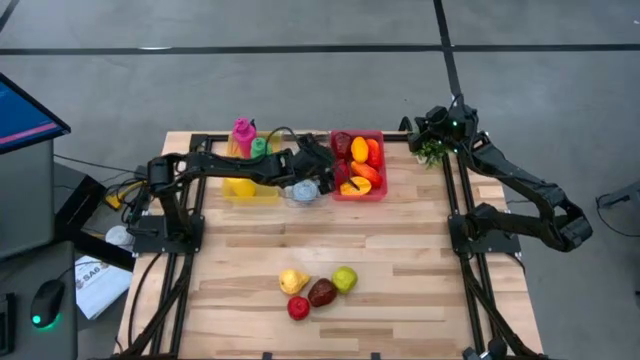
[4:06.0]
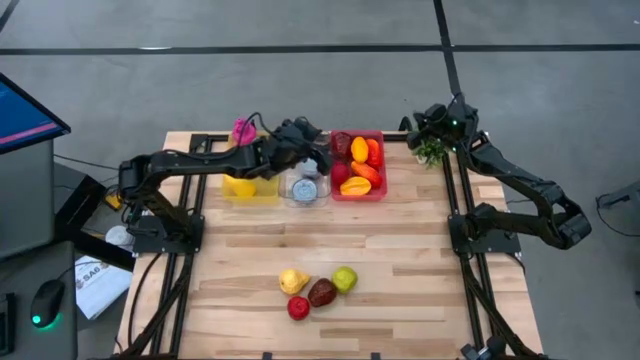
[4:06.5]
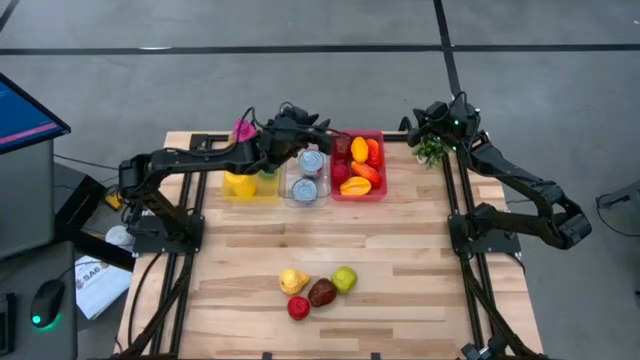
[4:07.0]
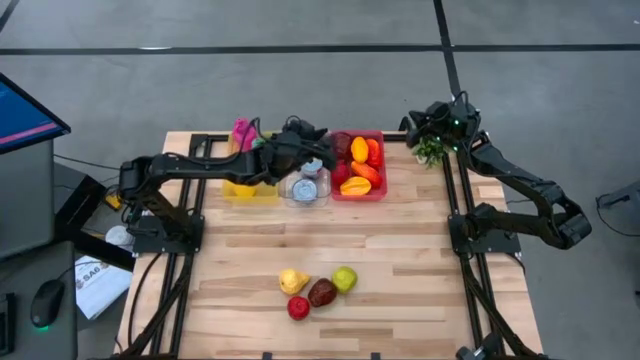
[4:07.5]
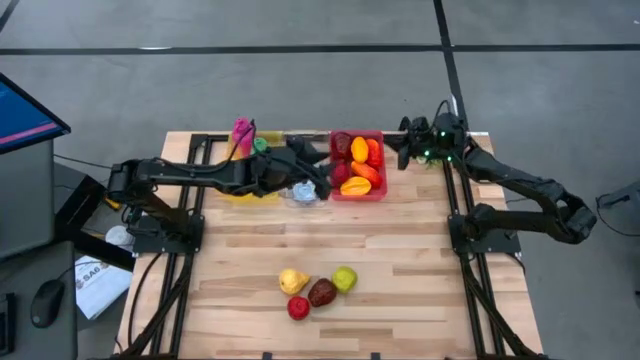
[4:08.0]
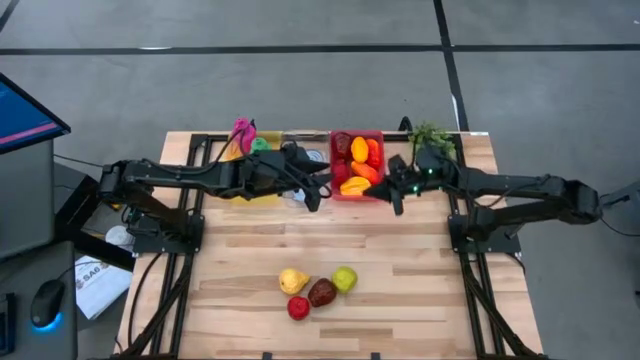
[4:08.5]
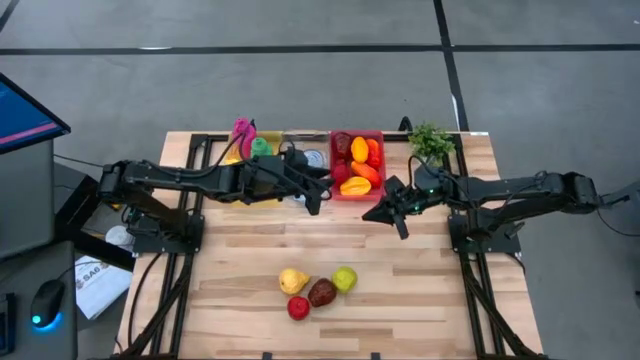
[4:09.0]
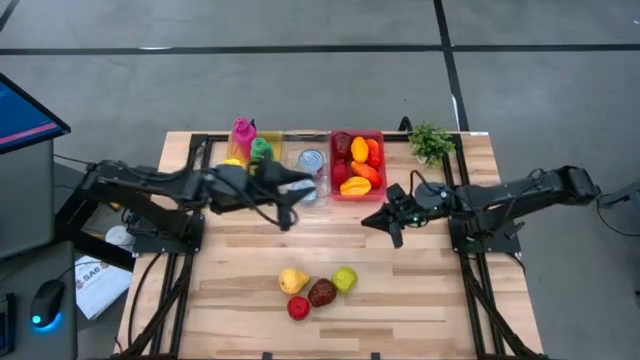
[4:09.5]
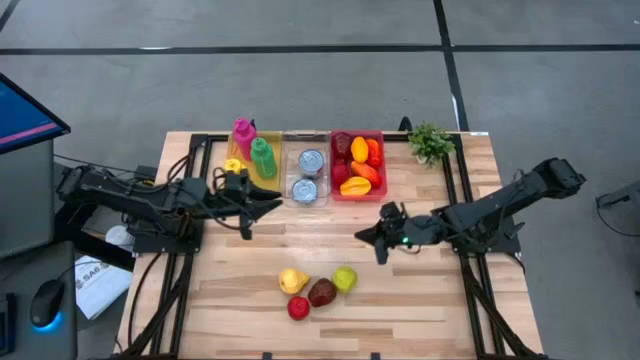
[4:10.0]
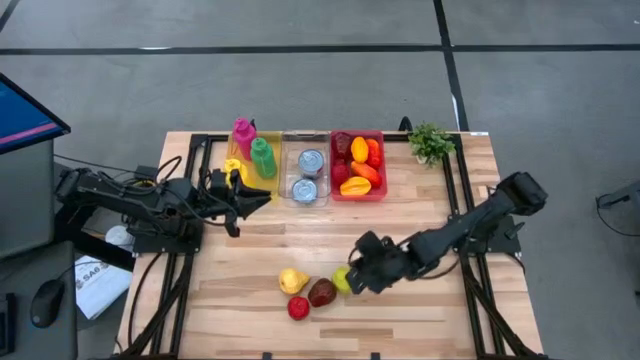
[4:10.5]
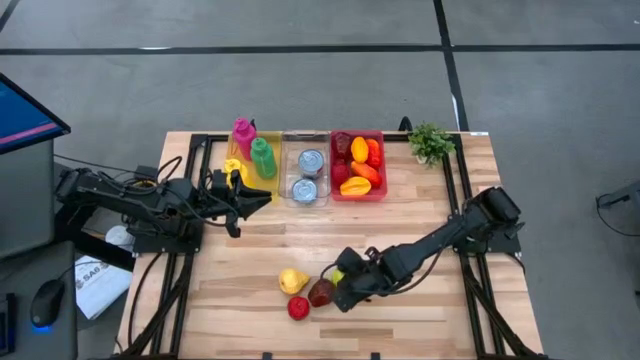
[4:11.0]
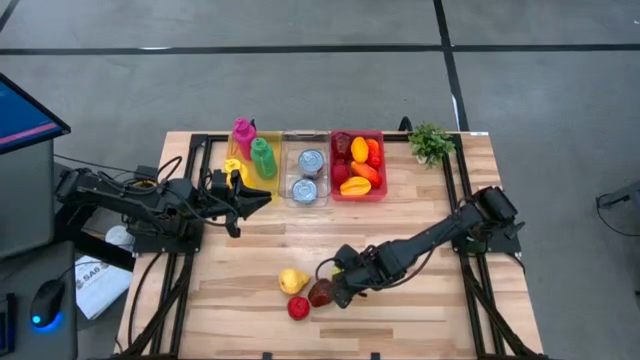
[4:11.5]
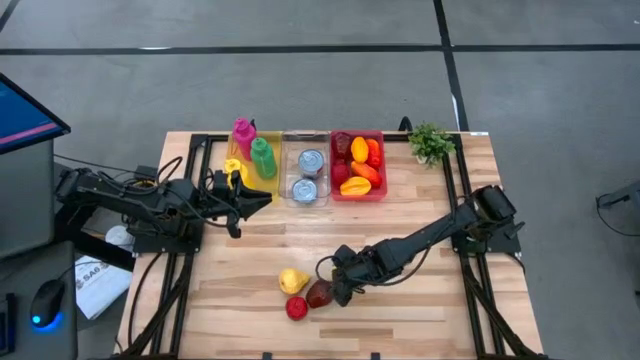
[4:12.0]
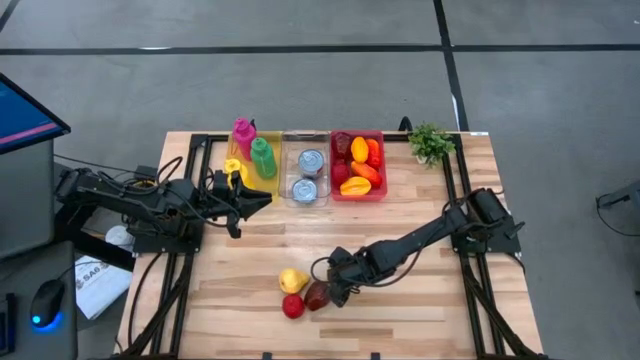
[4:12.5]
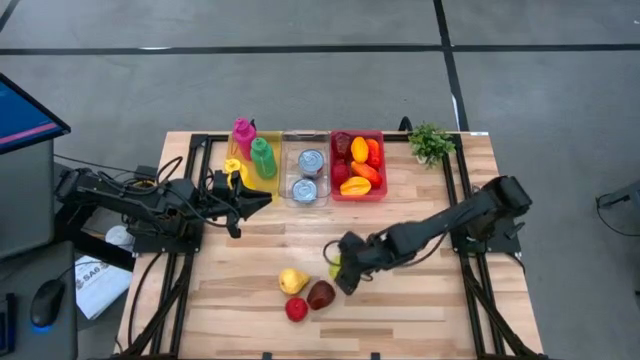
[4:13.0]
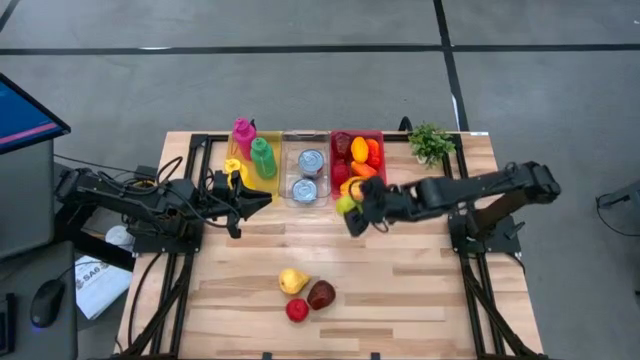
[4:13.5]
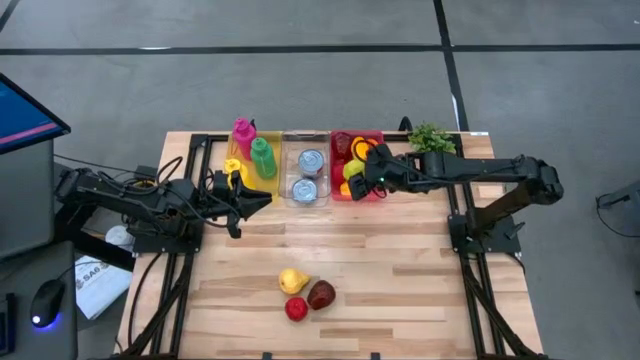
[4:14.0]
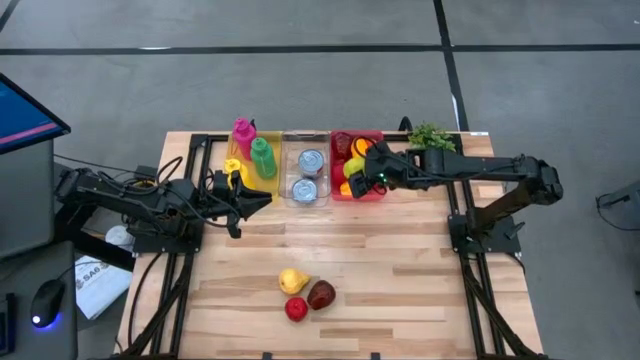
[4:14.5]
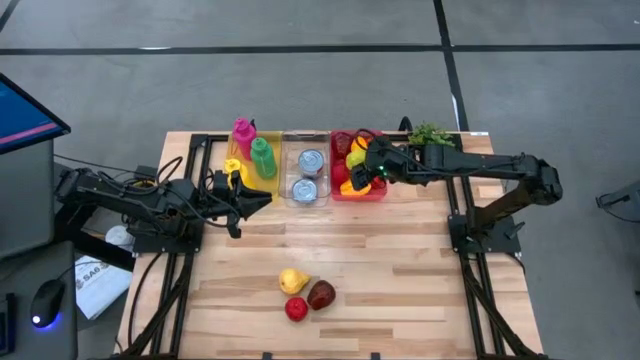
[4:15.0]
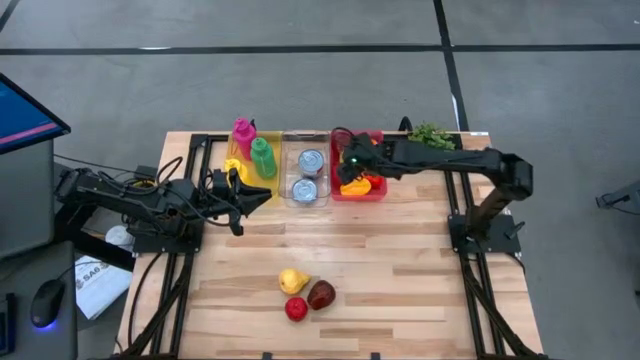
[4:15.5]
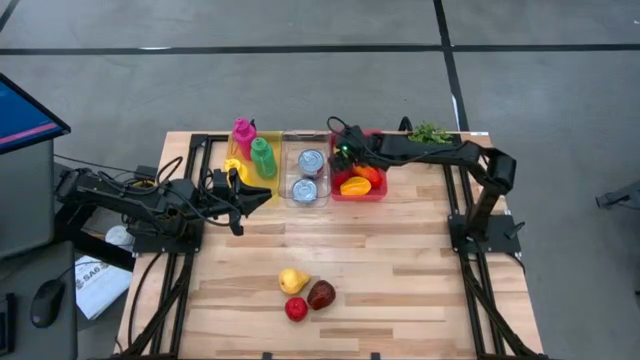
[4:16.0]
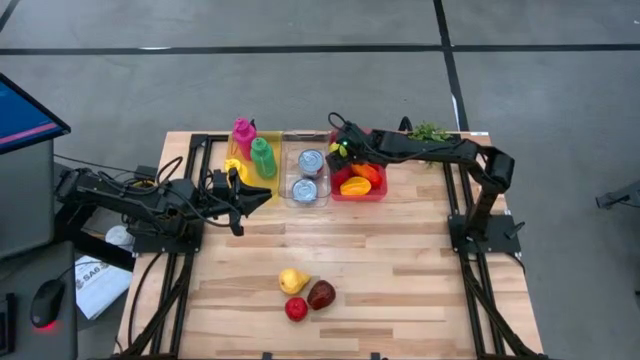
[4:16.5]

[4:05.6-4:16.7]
Task: Pick & Place Food Item
Put the green apple into the pink bin

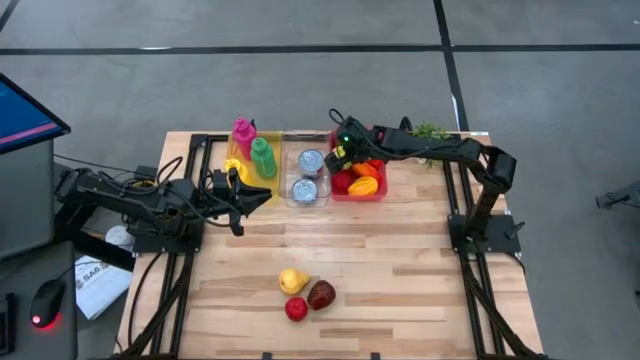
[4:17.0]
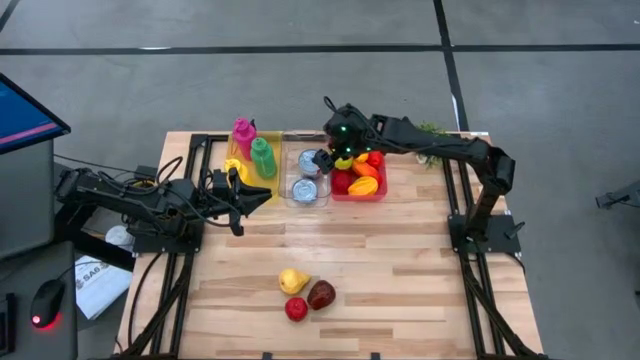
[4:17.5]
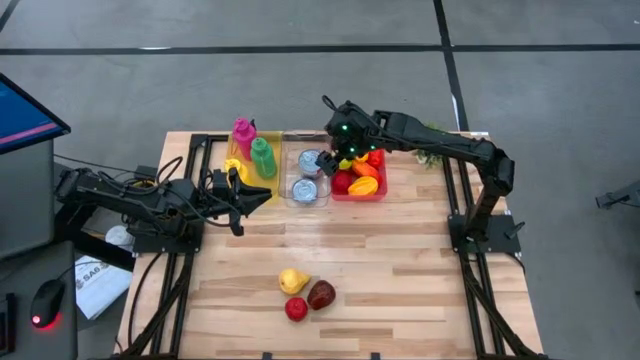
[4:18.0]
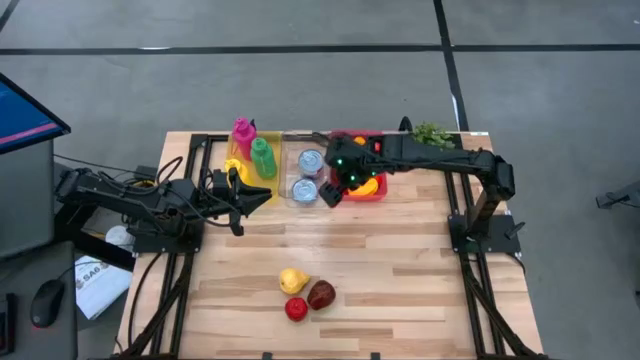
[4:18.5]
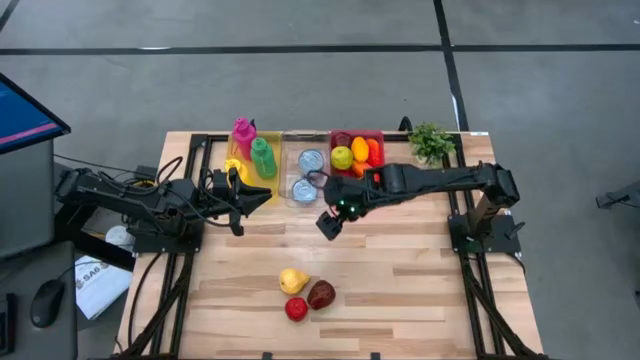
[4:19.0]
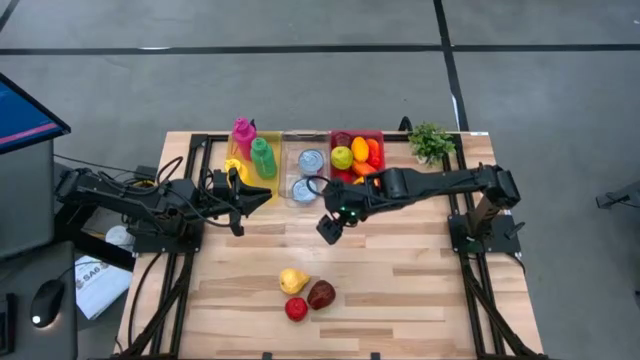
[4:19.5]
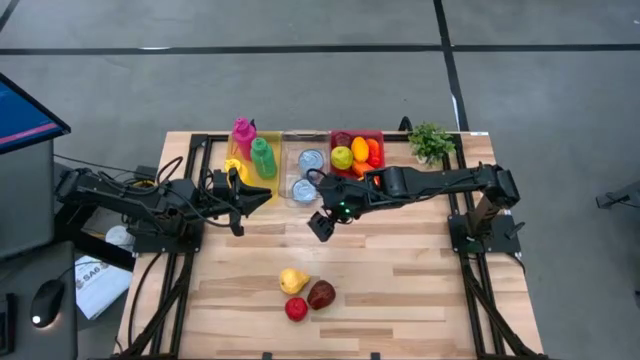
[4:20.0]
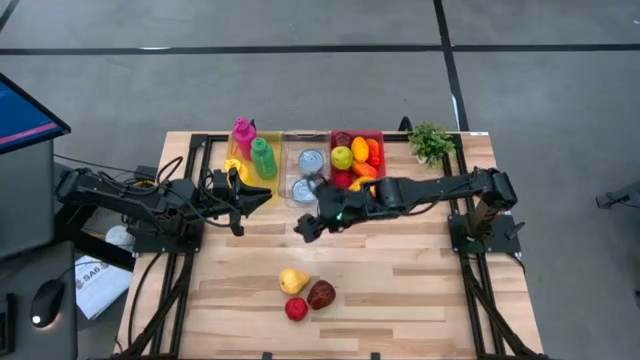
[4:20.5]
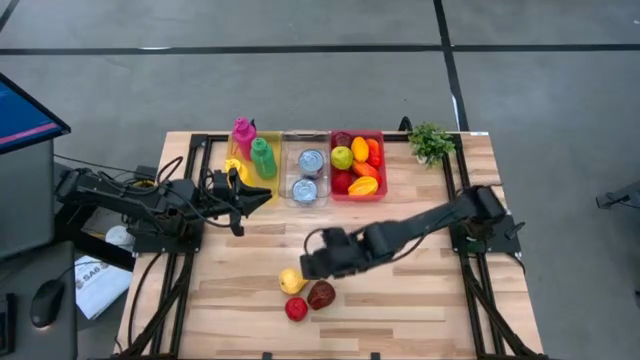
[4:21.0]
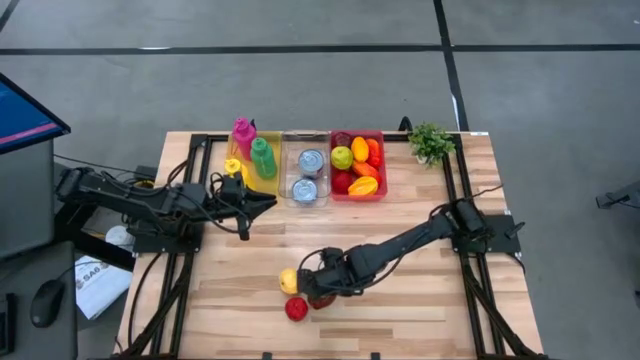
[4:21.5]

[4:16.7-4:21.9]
Put the right red apple into the pink bin

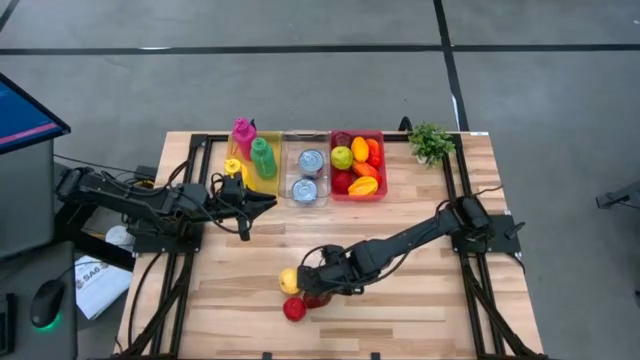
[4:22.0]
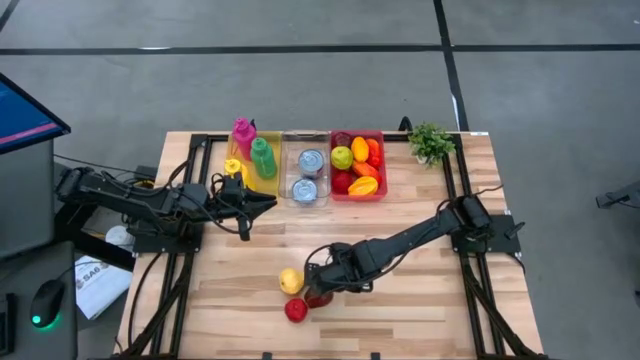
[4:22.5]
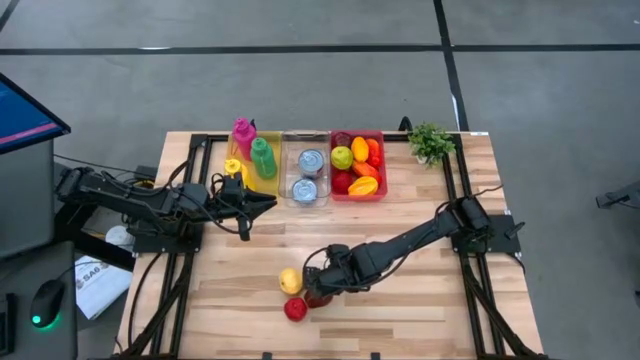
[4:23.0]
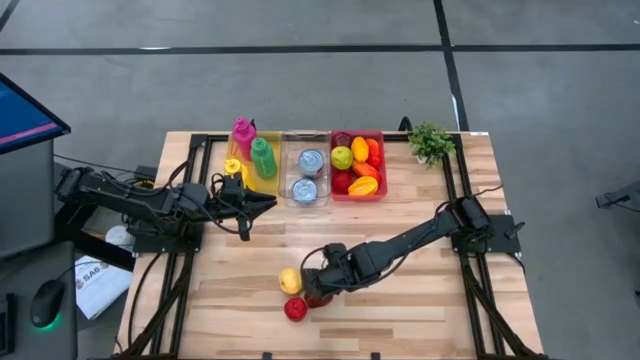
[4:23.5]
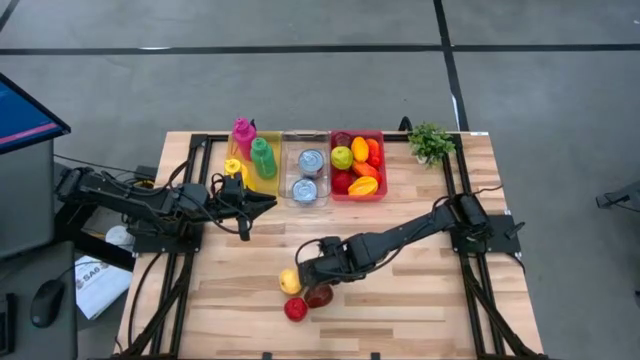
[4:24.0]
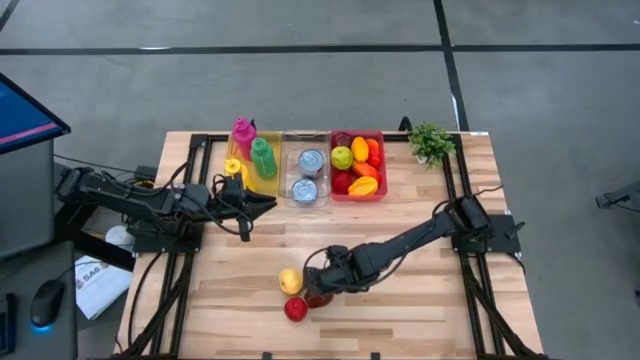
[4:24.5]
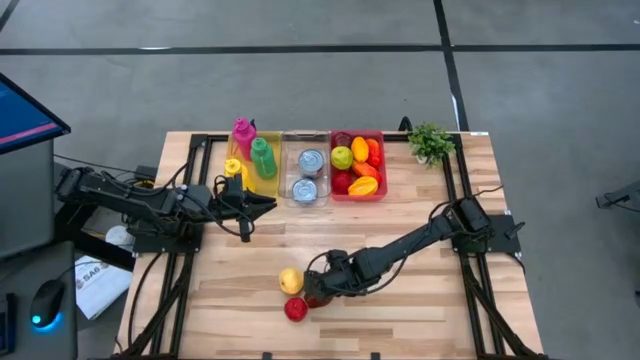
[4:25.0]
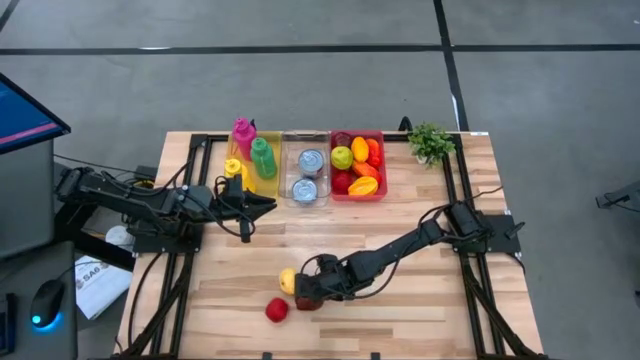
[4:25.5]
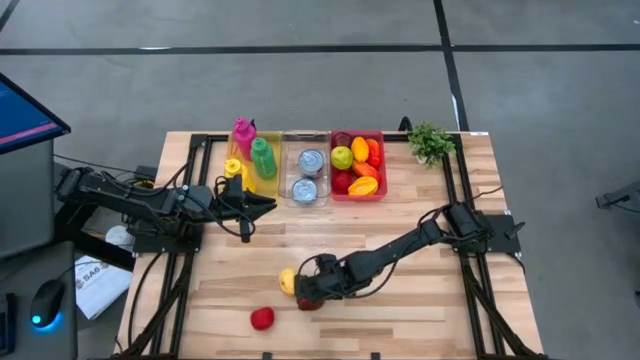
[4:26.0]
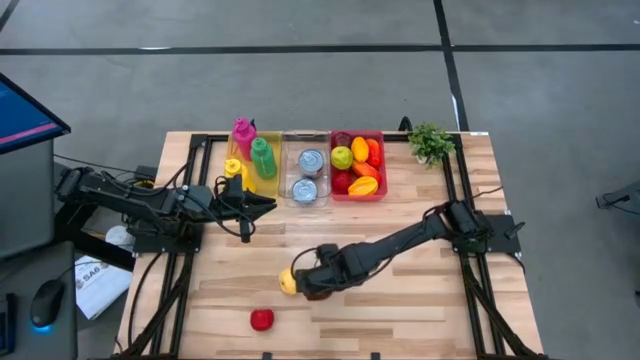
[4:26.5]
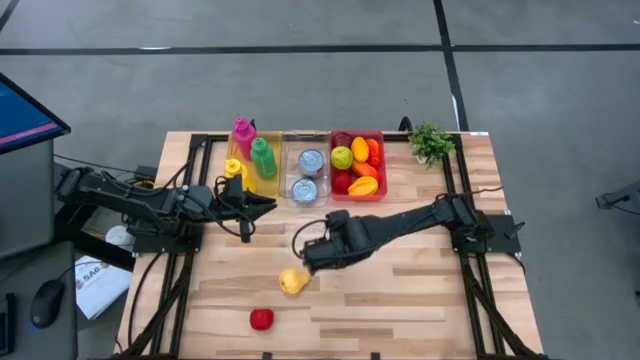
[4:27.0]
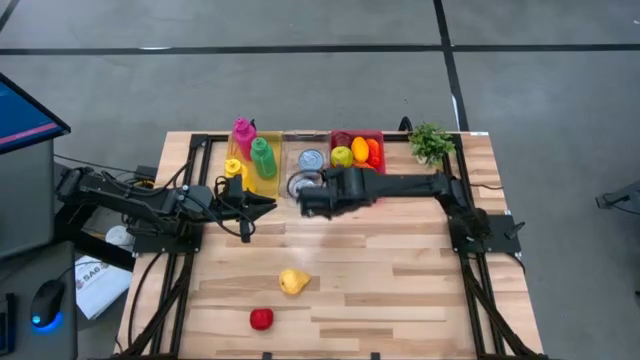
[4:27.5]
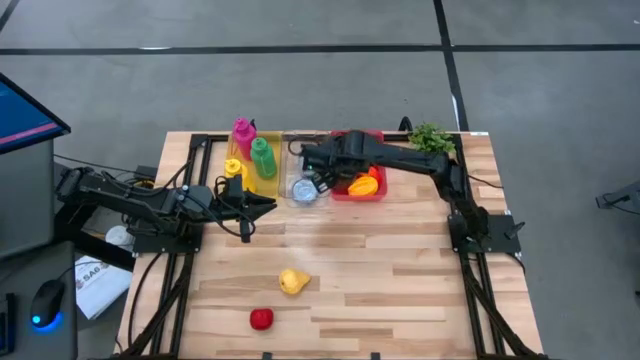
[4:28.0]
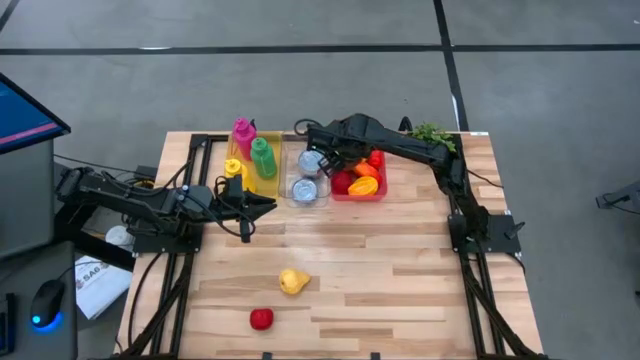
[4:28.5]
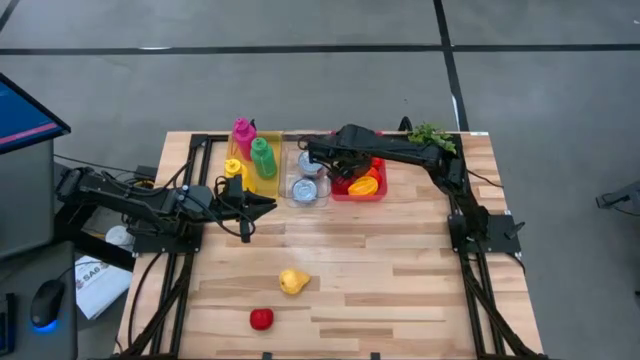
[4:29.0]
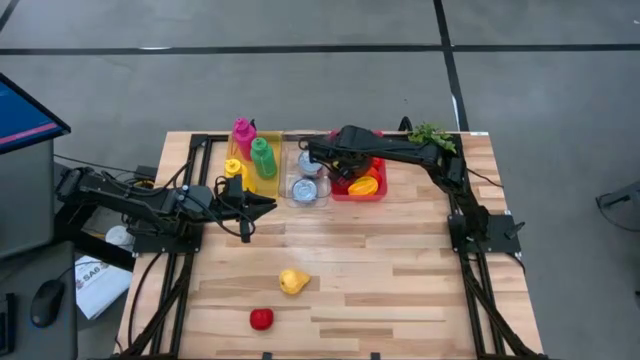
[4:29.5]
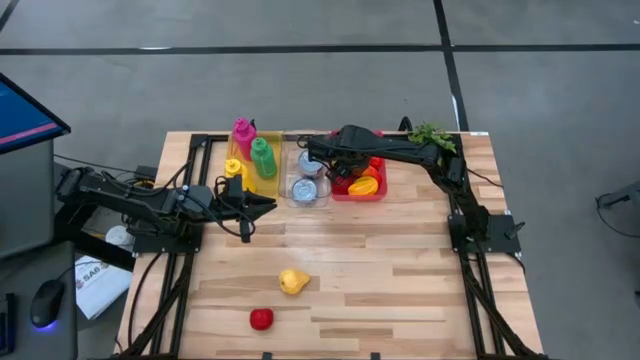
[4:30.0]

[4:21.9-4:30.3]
Put the right red apple into the pink bin
